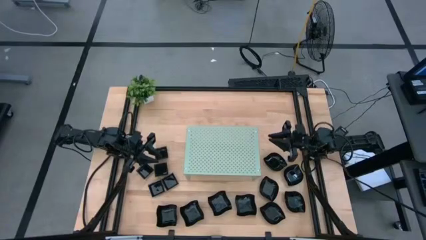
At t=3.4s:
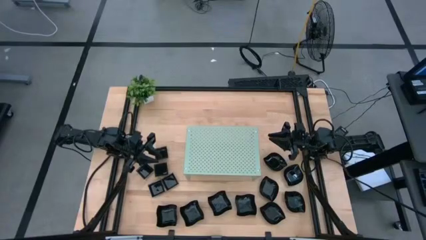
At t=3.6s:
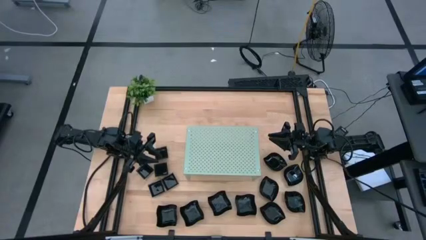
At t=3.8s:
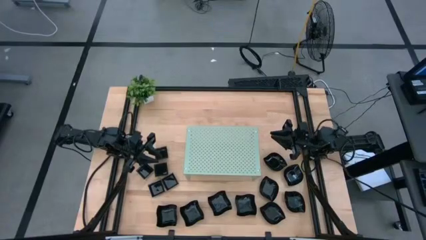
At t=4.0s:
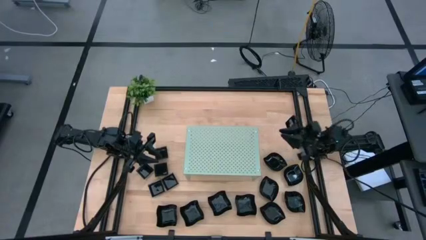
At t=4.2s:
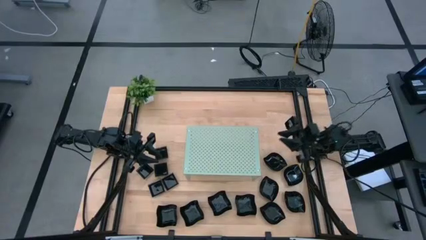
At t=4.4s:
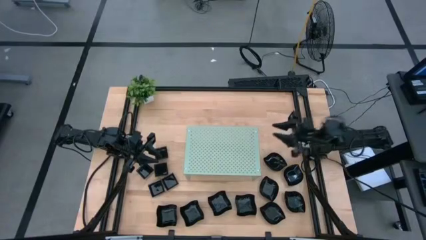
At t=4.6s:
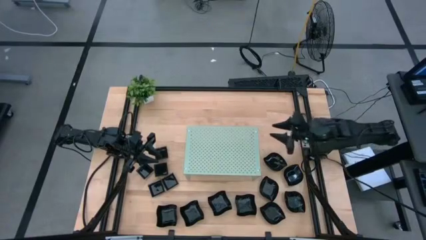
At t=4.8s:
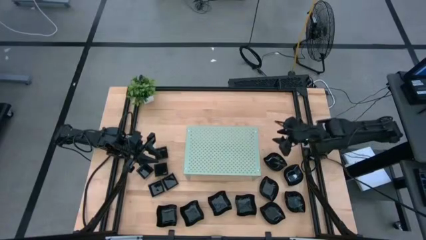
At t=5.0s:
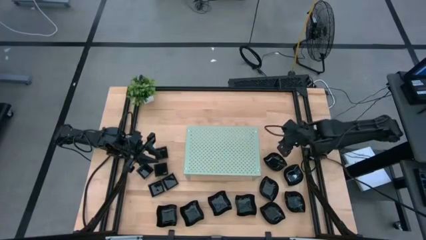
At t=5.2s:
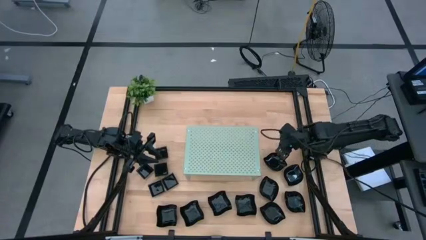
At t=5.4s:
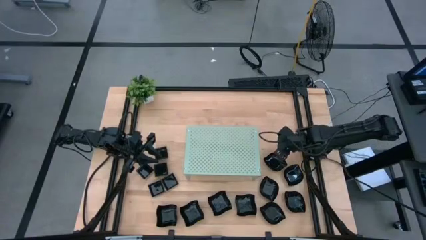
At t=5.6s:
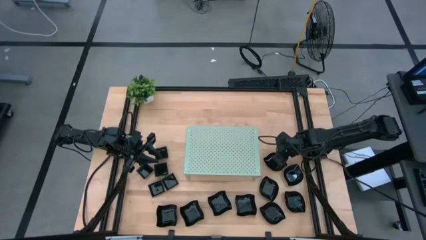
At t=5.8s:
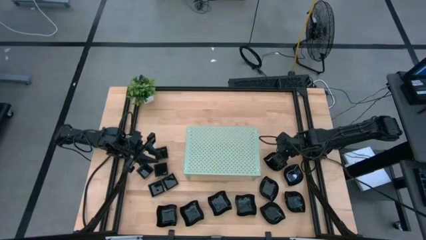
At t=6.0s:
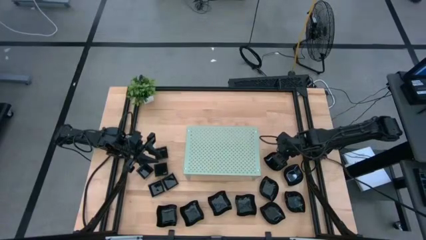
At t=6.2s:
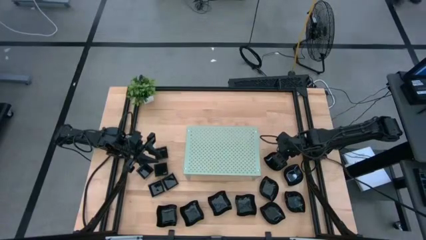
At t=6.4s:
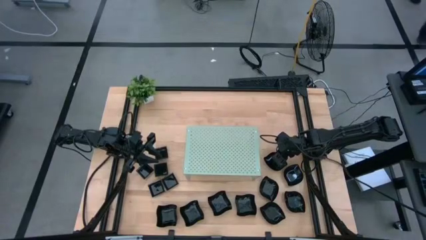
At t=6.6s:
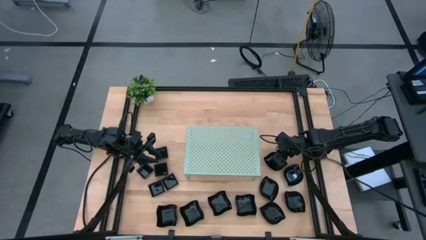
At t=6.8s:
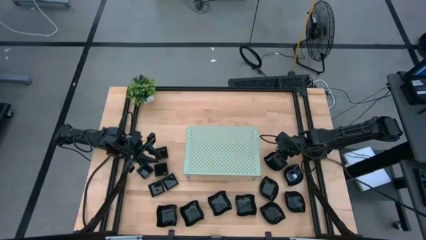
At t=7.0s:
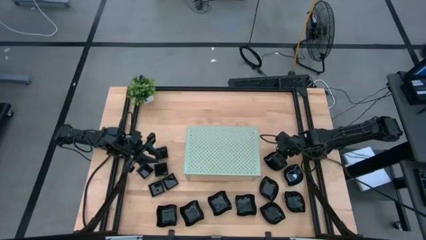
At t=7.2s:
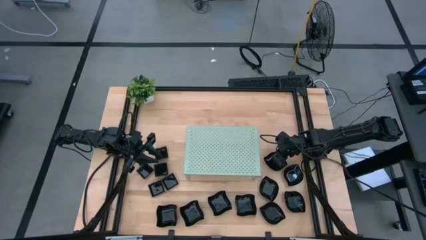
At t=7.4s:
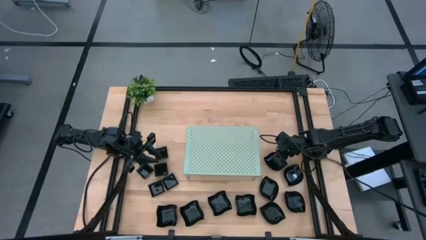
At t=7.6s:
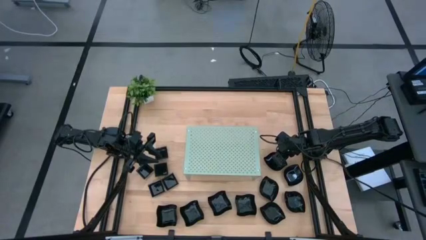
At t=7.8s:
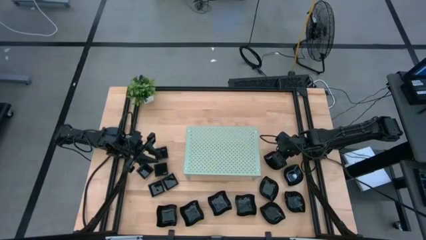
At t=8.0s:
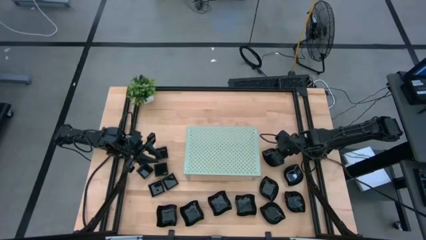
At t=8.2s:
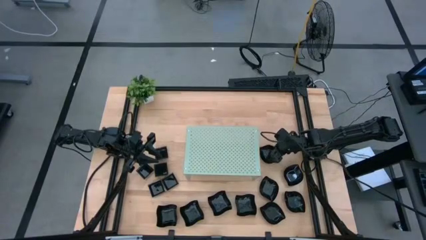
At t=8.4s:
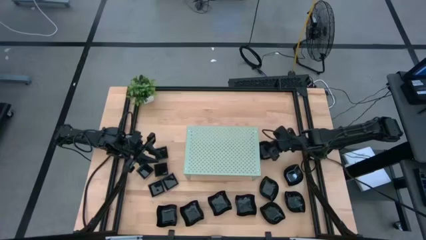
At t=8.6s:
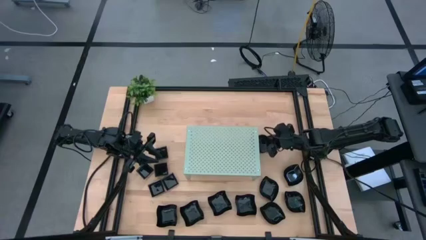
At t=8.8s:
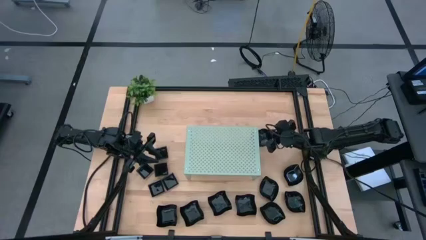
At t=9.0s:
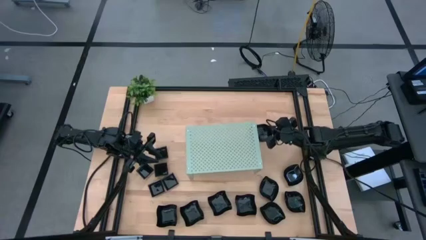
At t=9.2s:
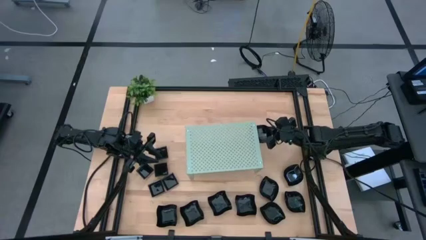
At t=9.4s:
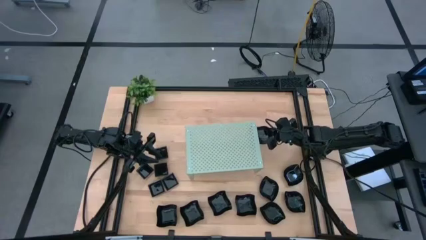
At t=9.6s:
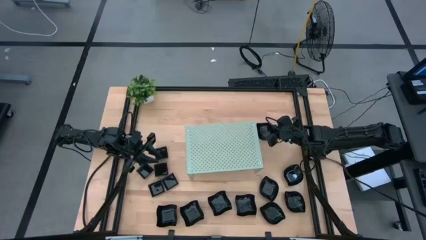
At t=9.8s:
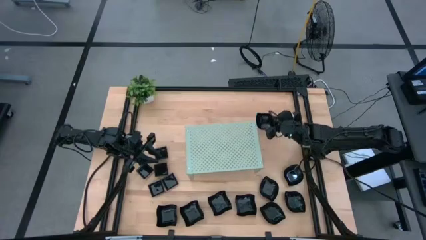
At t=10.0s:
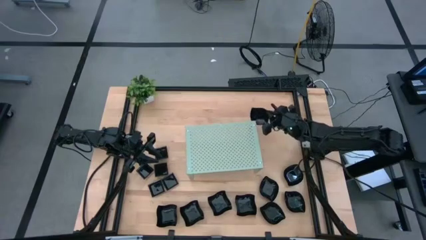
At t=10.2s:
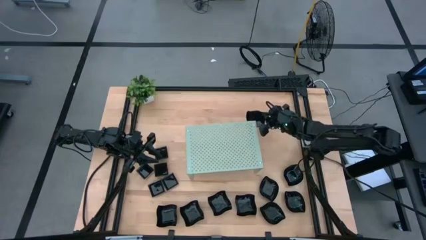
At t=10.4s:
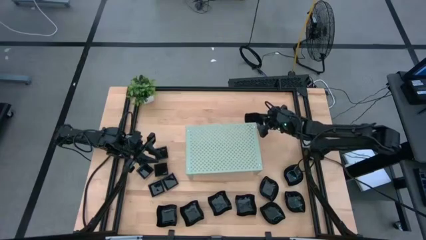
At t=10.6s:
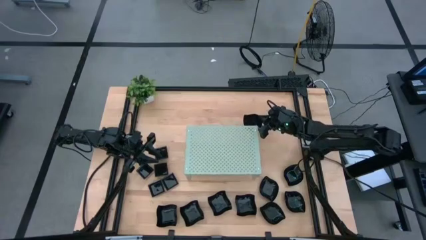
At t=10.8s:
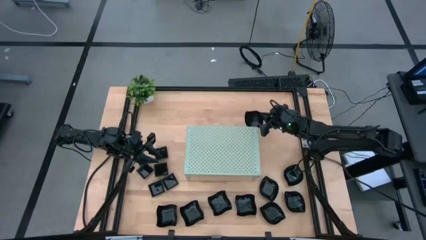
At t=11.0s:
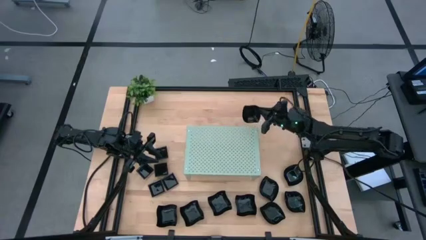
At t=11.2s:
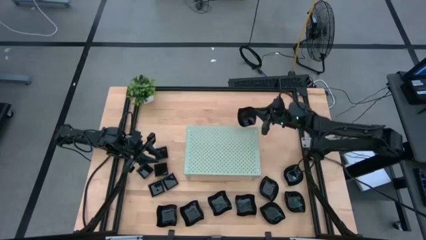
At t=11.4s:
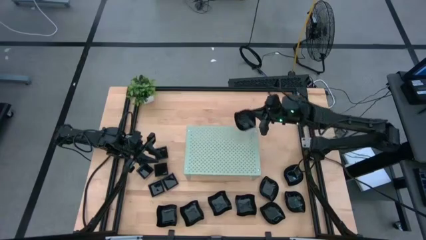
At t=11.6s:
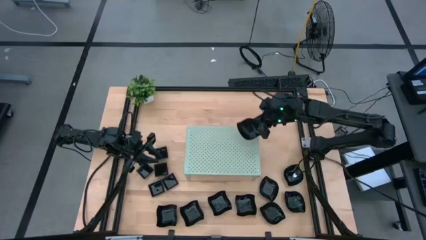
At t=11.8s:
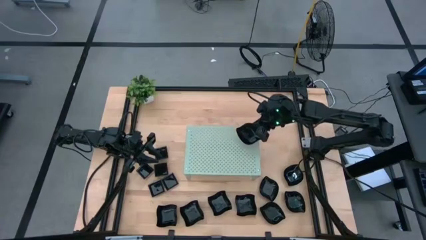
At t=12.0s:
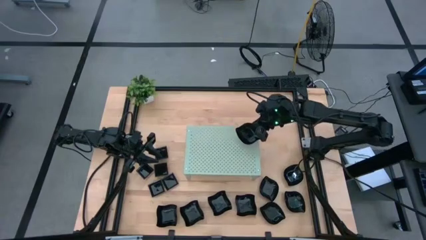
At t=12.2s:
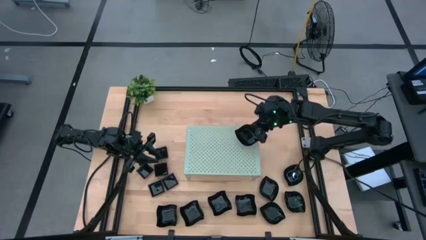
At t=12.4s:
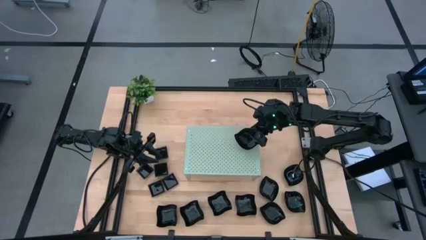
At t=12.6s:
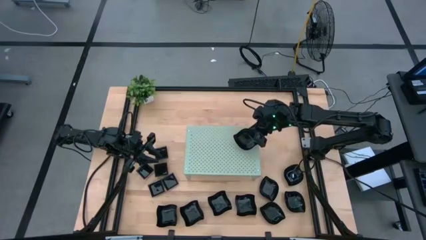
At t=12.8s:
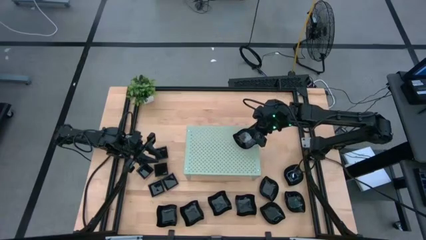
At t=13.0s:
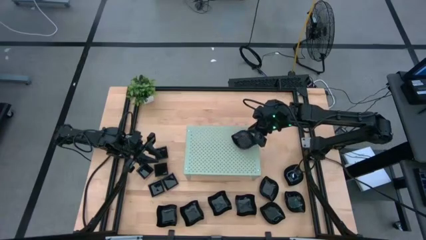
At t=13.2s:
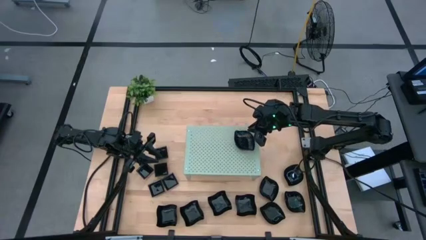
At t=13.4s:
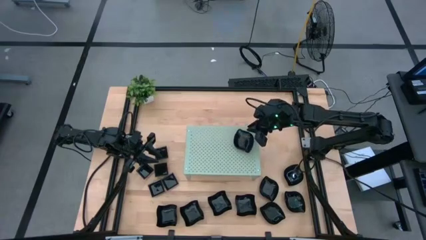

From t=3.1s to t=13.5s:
Task: Pick & Place Mini shaped plates
Put the leaf-shaped plate on the shelf

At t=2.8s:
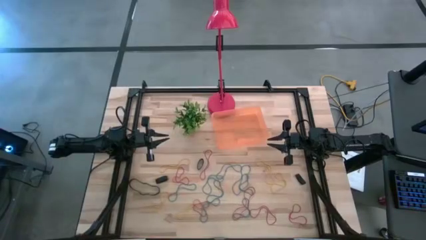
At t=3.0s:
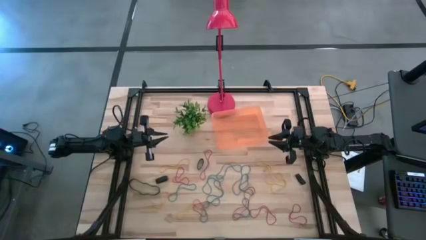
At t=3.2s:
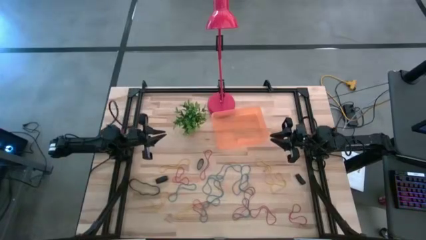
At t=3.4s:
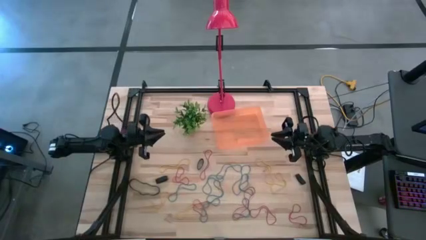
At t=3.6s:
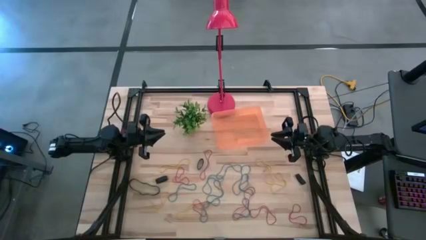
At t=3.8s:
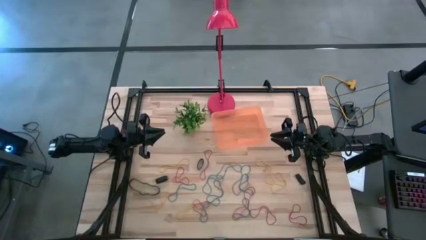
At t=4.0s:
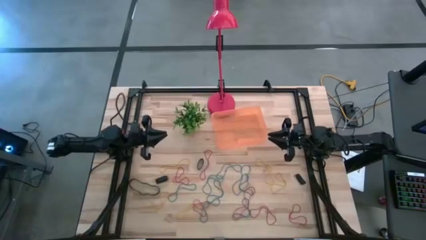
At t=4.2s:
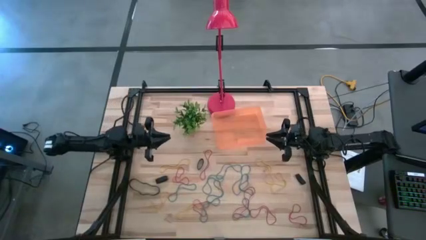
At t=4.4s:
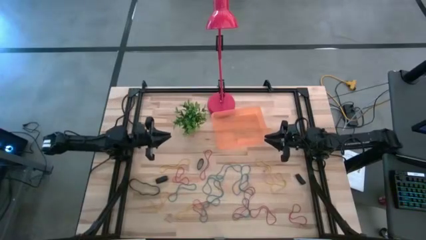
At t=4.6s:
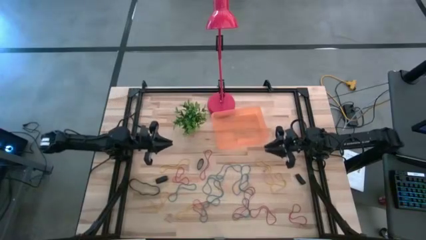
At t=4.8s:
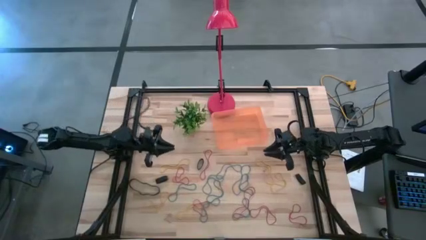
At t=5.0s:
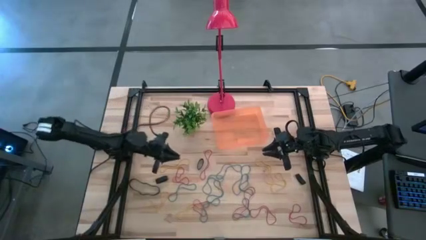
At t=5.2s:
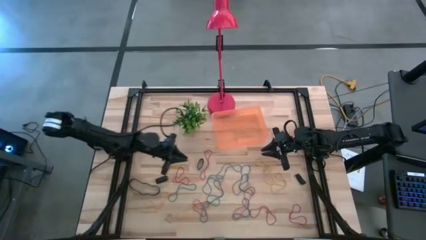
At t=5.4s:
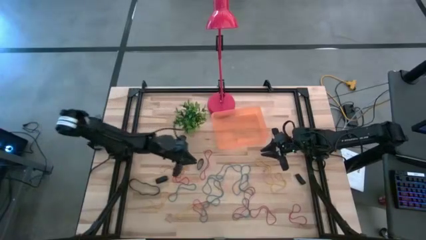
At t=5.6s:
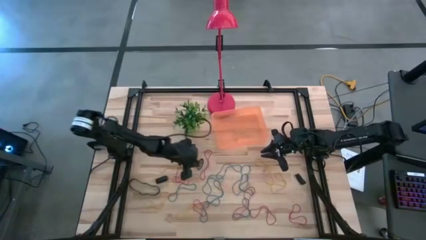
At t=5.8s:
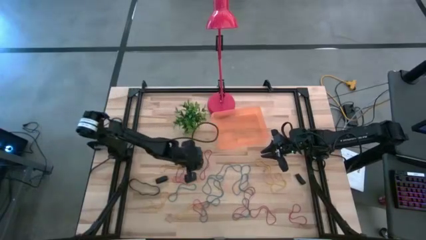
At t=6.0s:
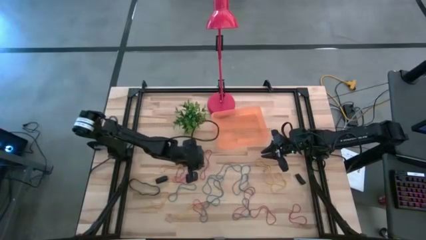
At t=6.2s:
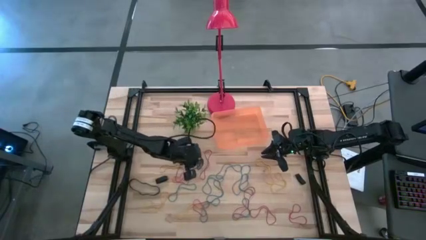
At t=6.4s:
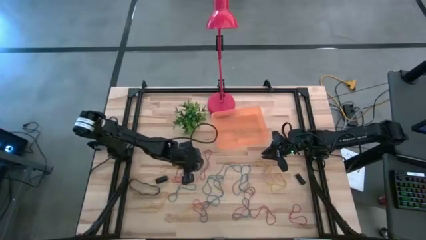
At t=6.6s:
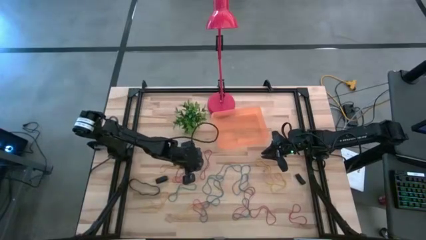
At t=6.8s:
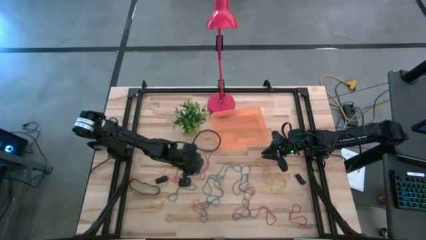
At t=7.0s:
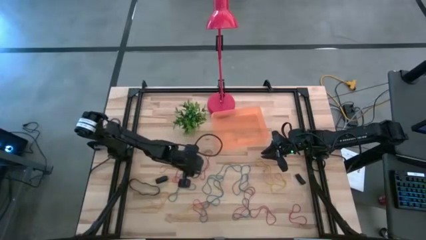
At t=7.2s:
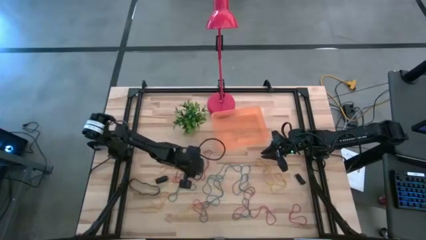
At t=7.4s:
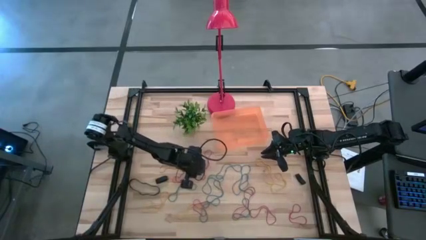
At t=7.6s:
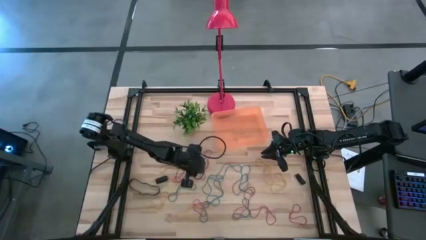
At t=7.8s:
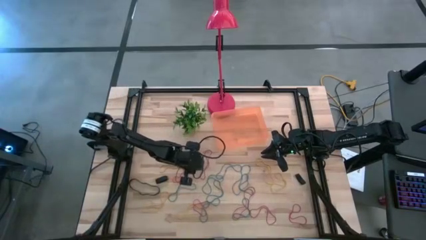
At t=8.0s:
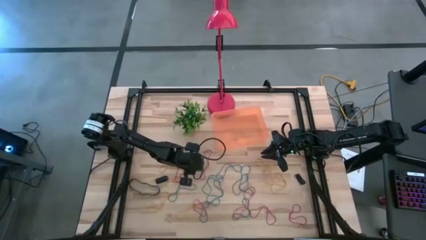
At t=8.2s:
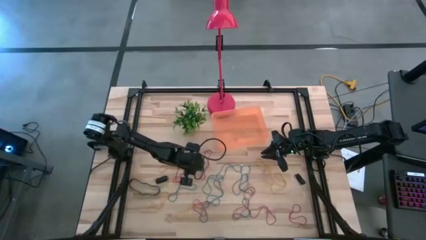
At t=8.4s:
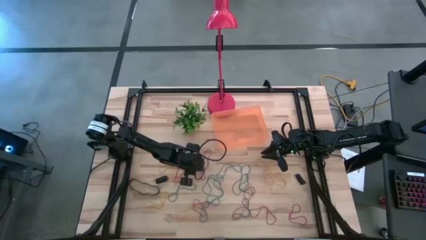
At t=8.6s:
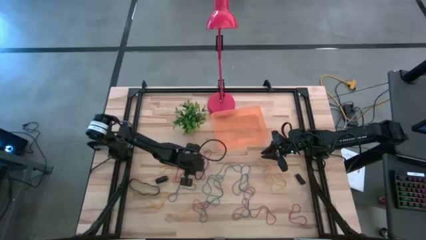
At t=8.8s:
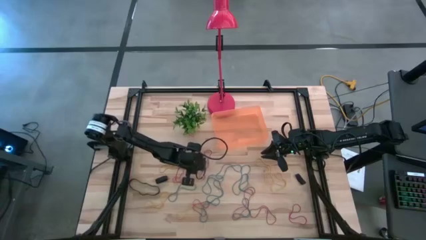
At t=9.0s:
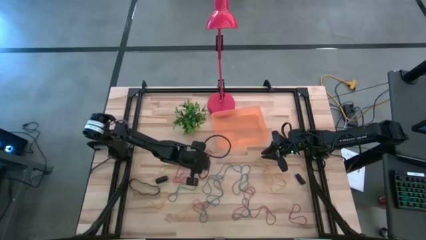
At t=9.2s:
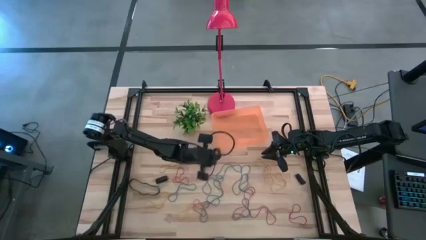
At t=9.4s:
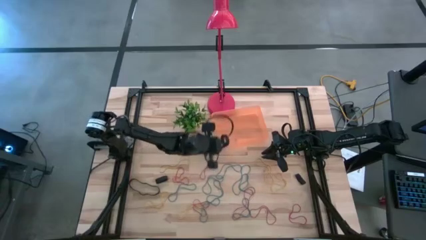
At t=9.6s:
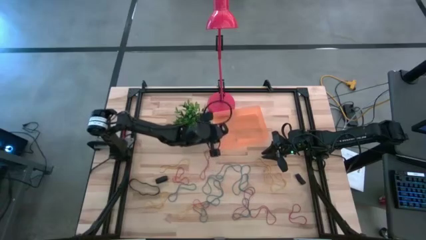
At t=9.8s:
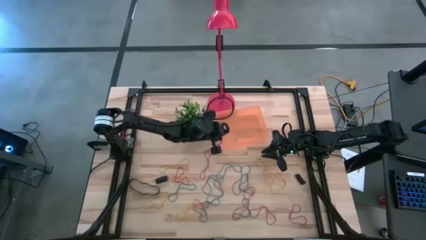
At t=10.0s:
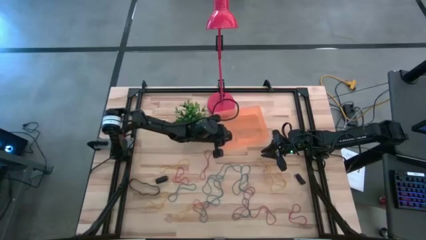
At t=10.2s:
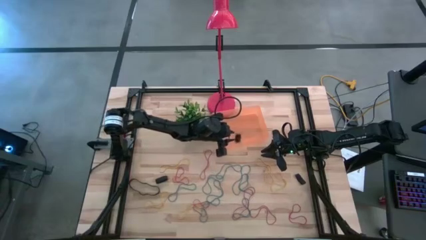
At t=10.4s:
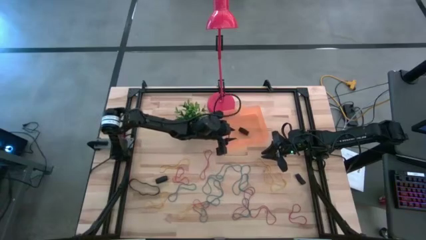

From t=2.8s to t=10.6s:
Task: Pick and place rubber bands into bin
Put the top left black rubberband into the orange container
